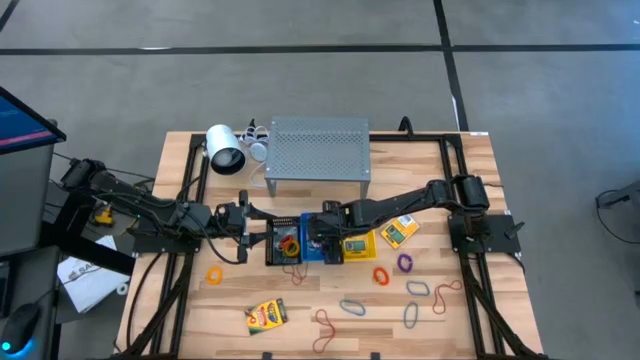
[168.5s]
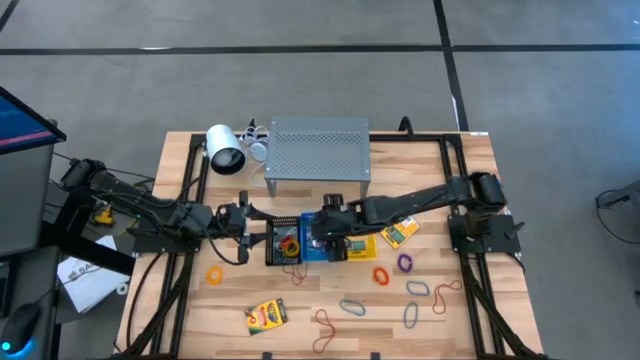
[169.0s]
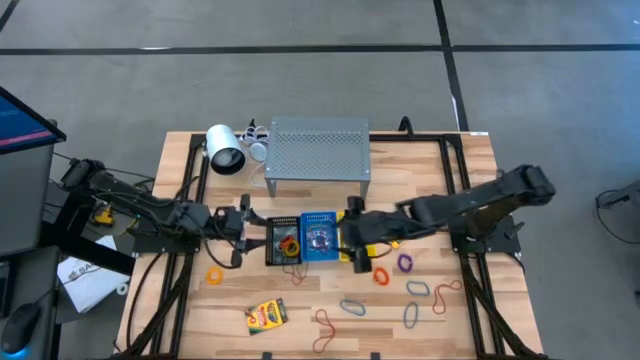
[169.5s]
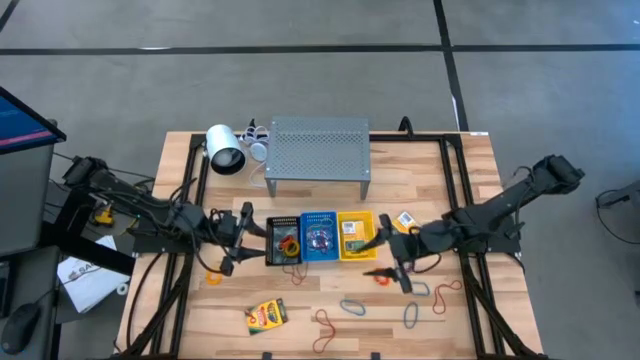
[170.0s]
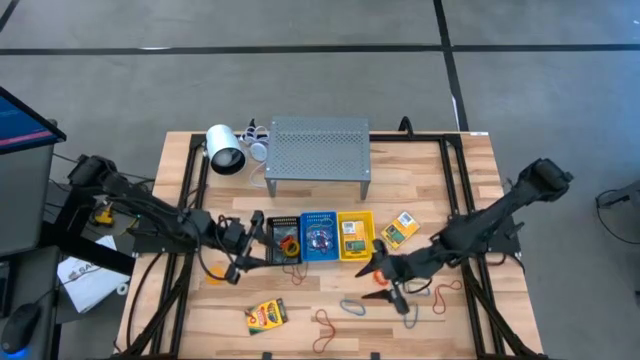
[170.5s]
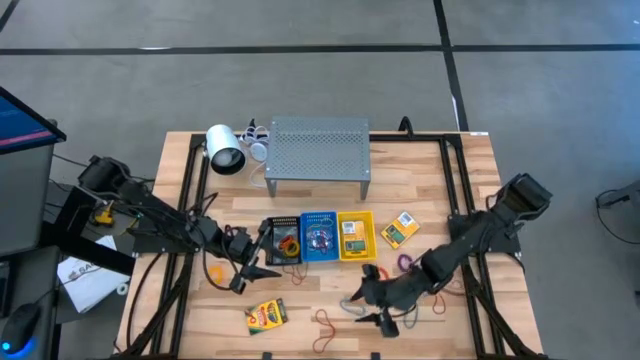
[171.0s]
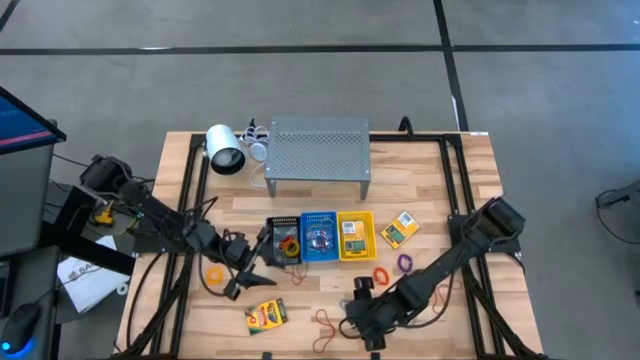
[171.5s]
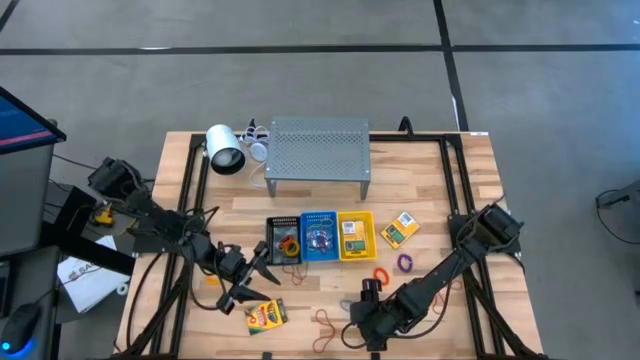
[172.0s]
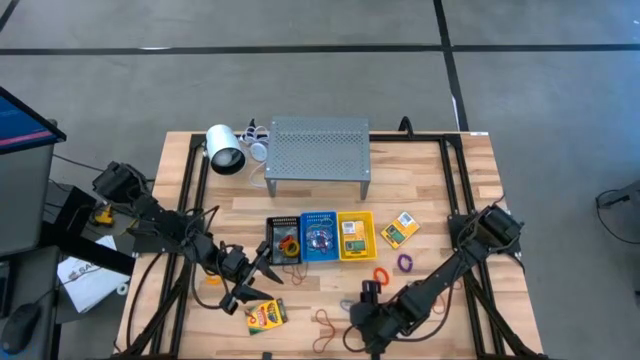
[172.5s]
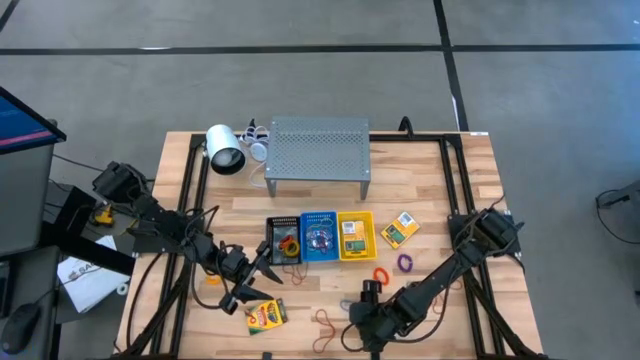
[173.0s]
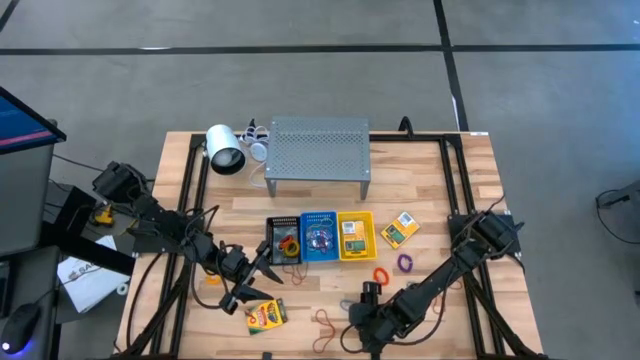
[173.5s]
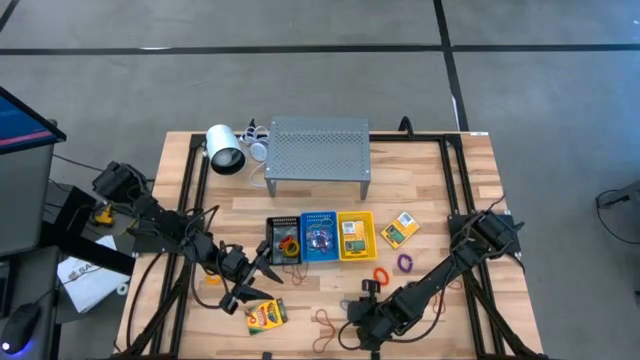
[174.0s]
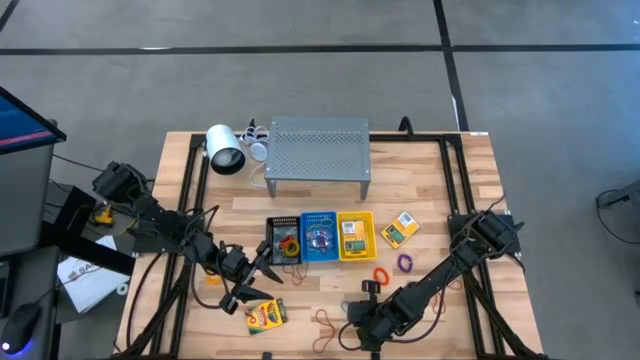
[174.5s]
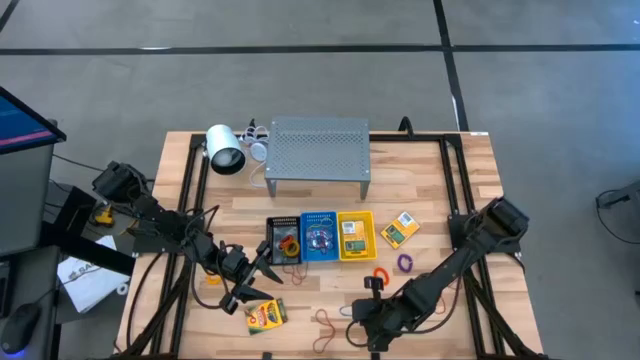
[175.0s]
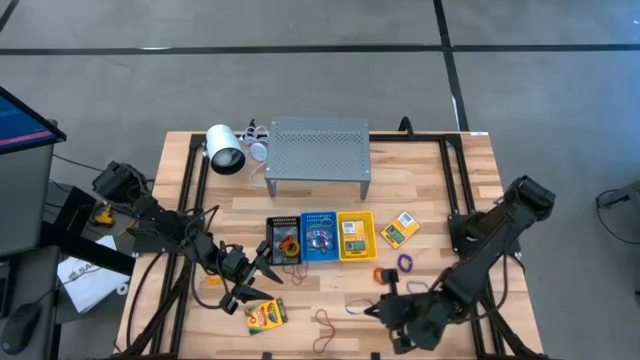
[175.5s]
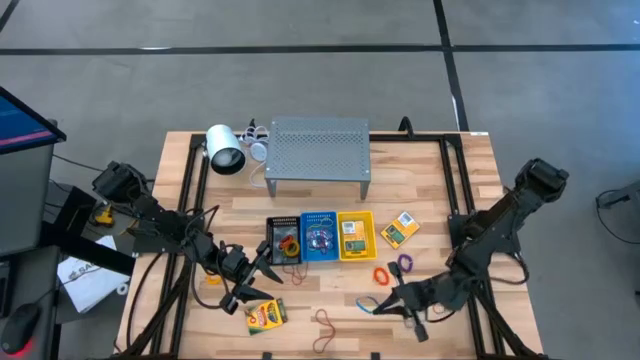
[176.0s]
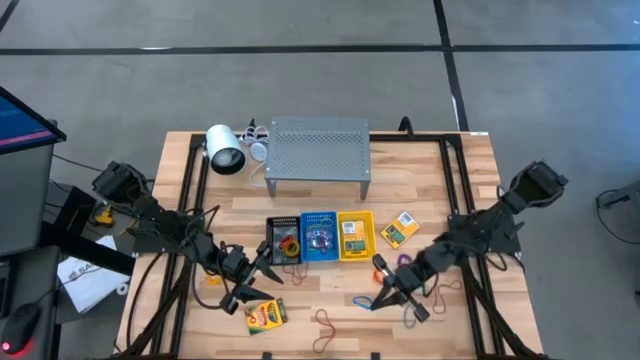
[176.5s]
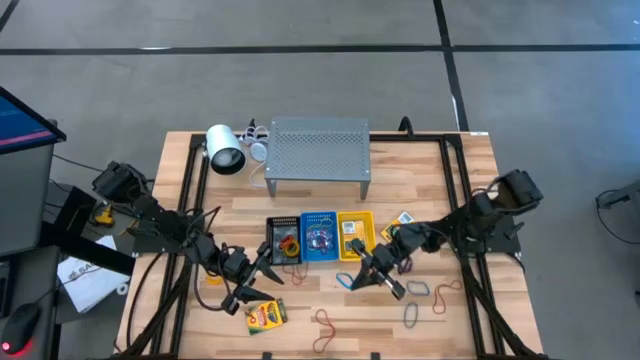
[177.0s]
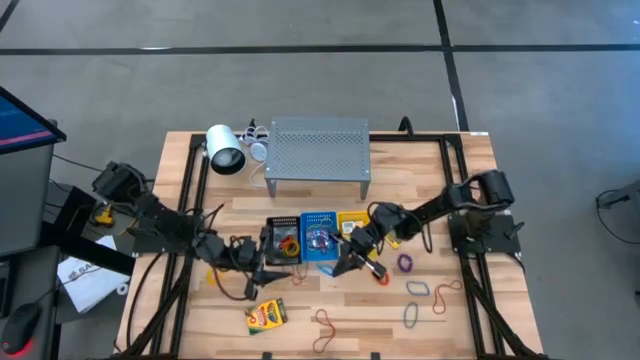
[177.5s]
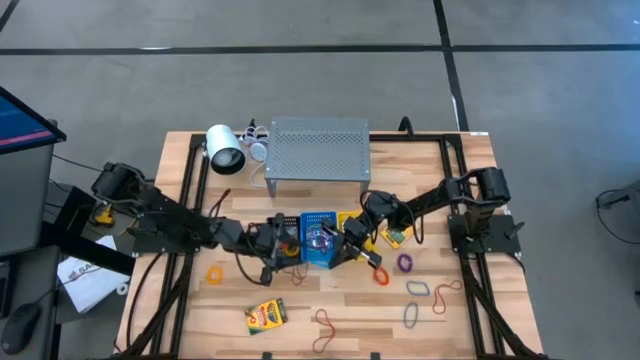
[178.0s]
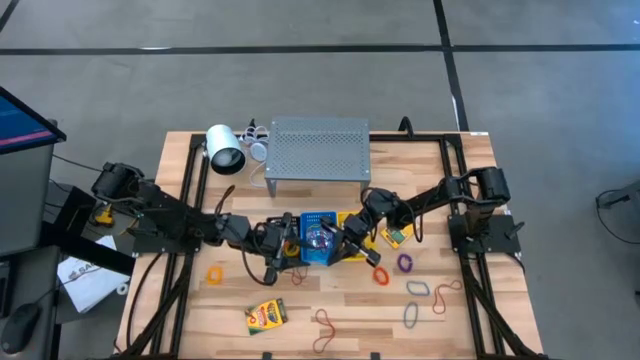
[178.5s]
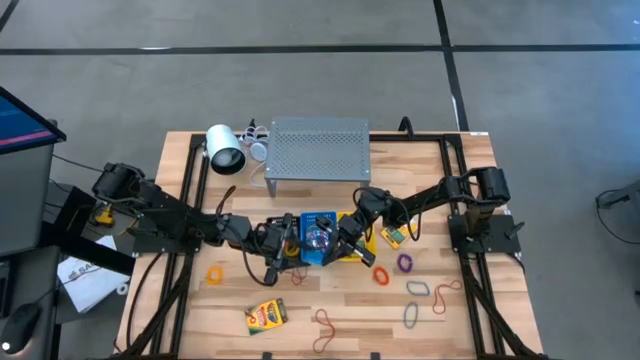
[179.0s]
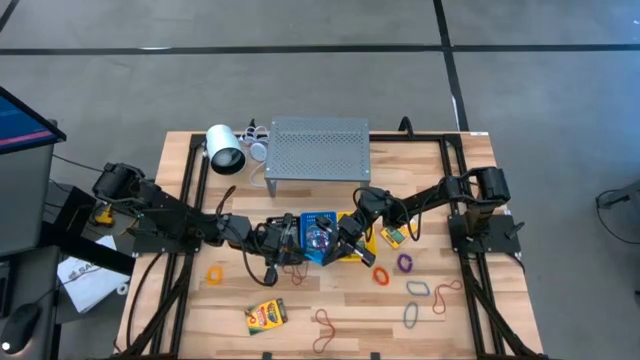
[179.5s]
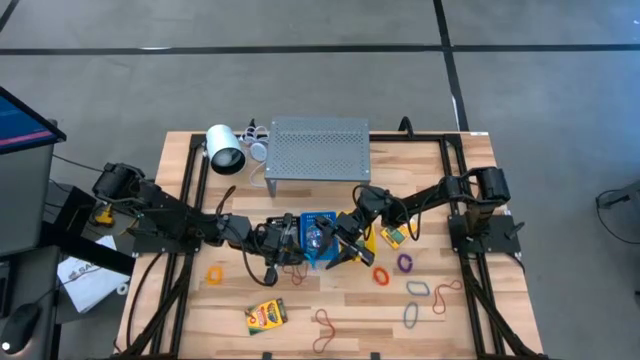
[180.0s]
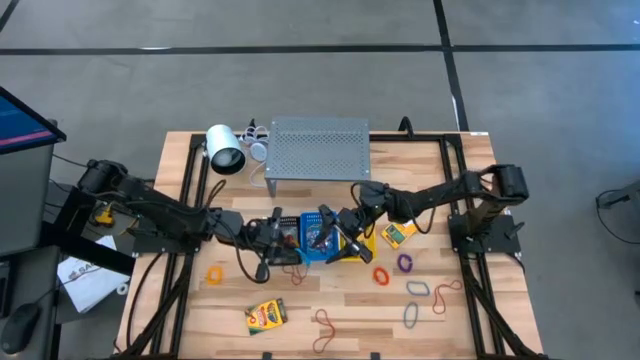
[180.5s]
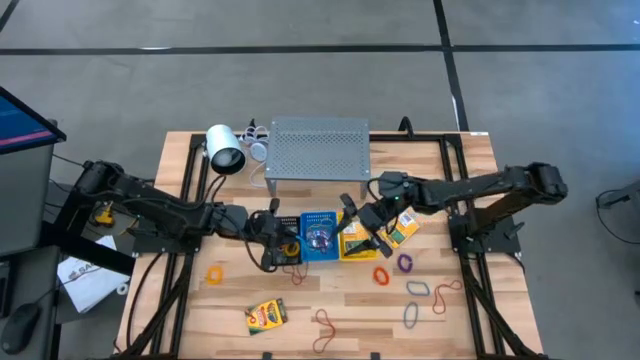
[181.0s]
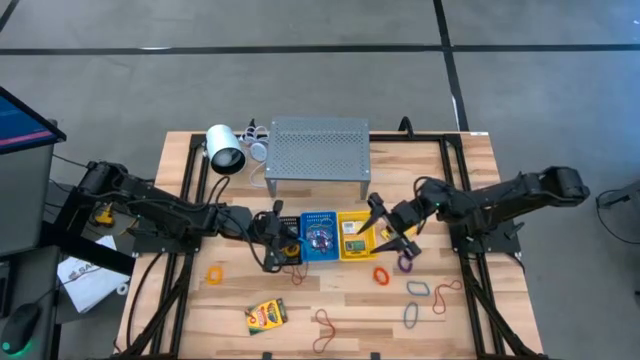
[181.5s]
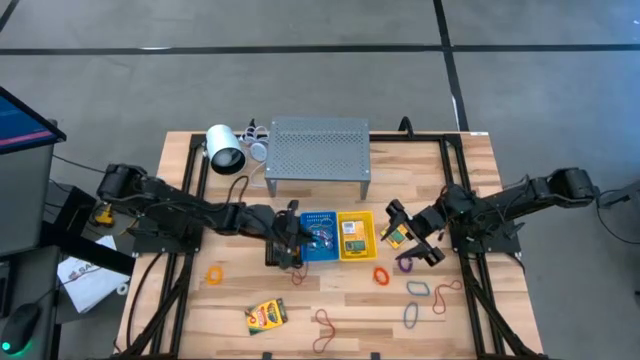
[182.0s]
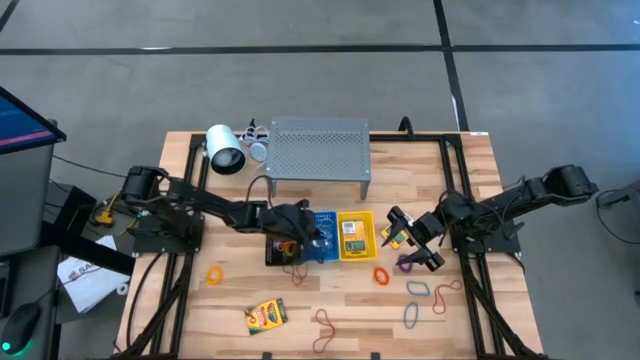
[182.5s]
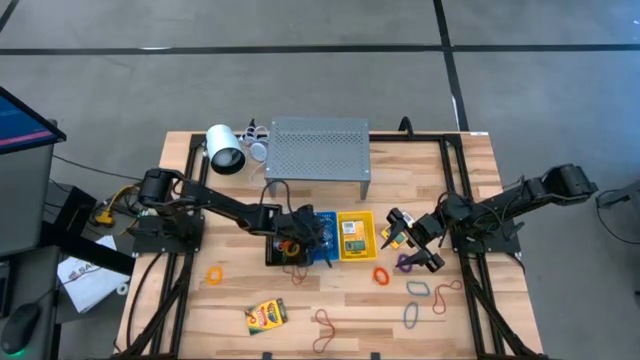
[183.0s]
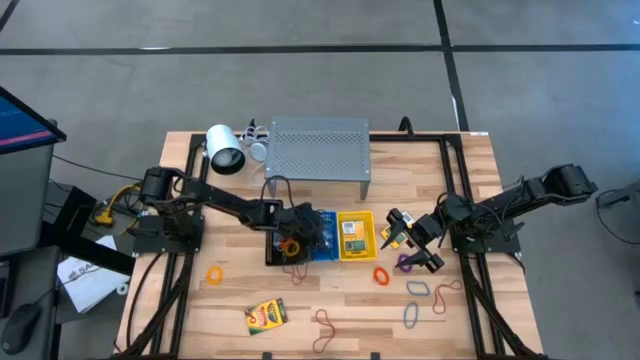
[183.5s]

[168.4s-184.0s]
Task: Pick & Place Office Desk Supplies
Put the blue rubber band into the blue basket

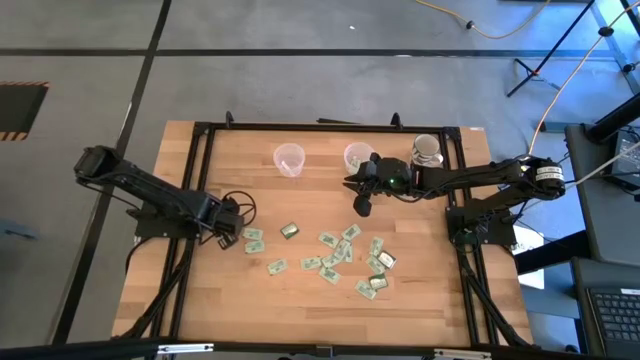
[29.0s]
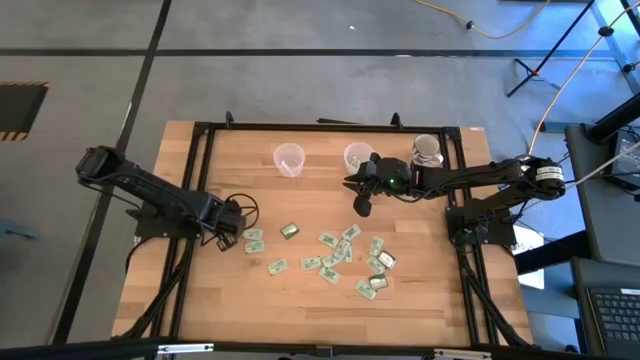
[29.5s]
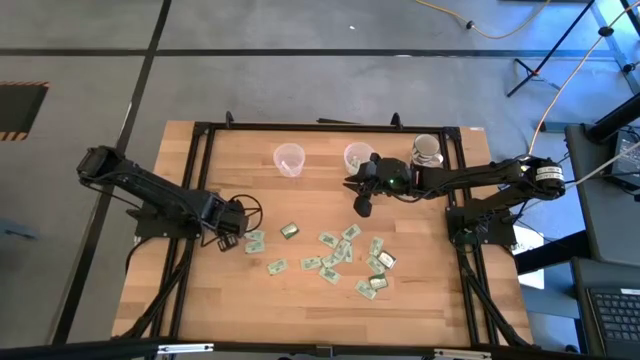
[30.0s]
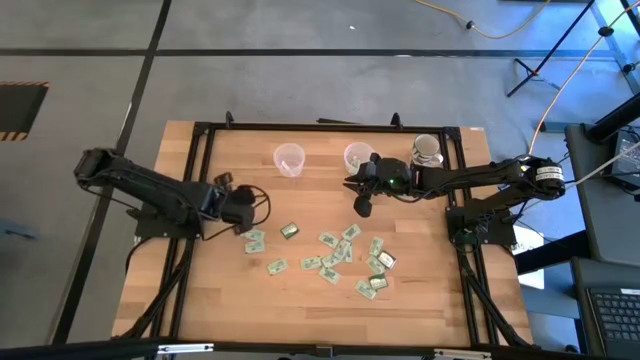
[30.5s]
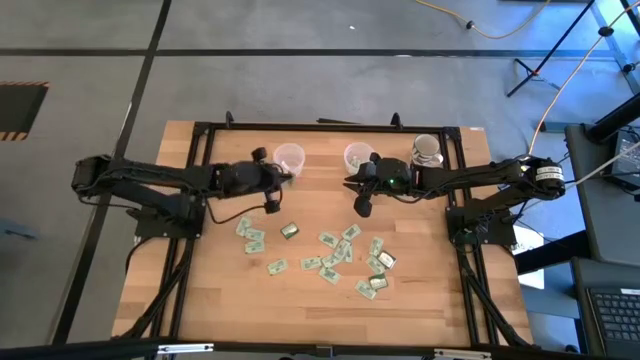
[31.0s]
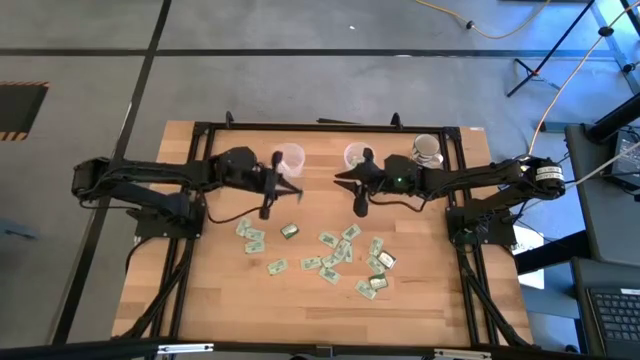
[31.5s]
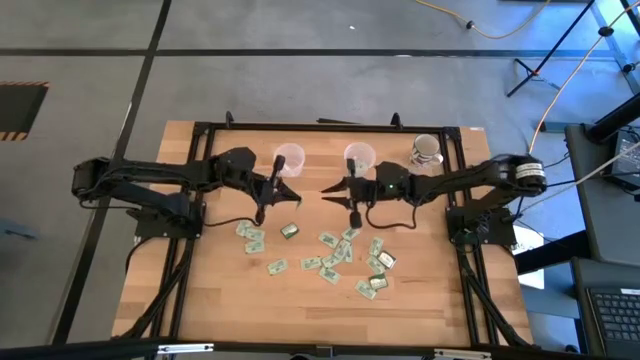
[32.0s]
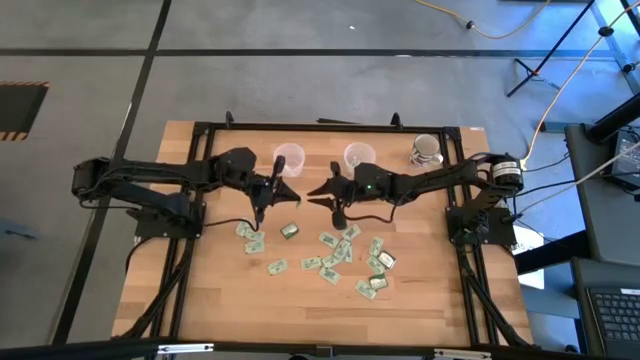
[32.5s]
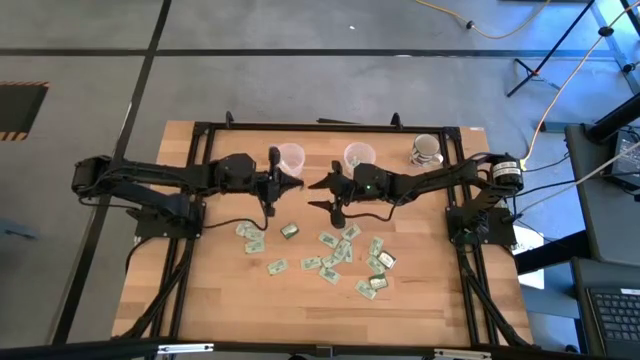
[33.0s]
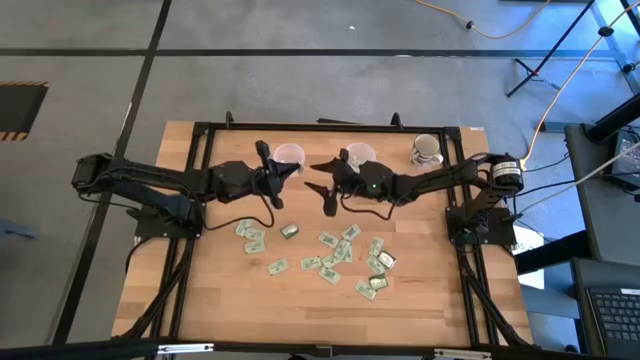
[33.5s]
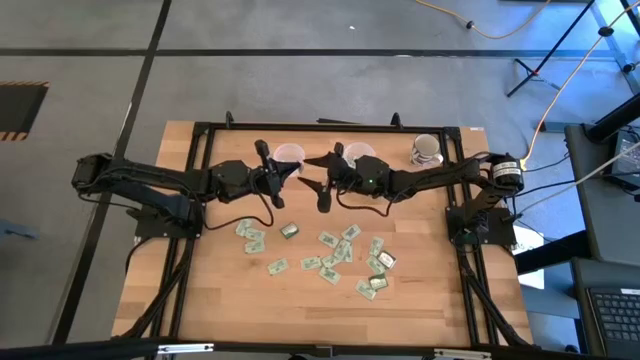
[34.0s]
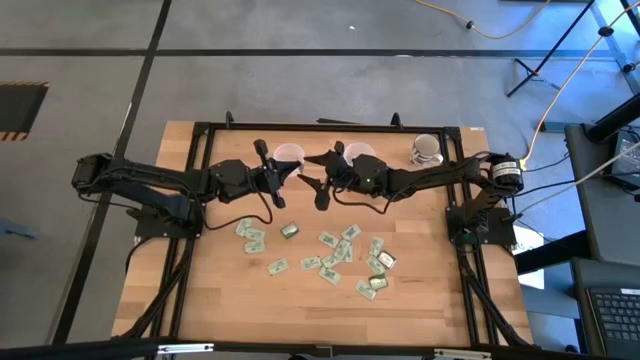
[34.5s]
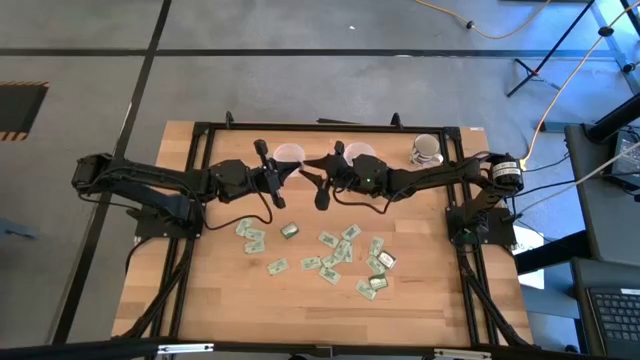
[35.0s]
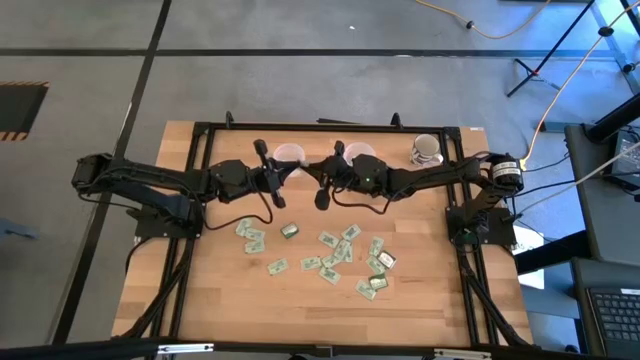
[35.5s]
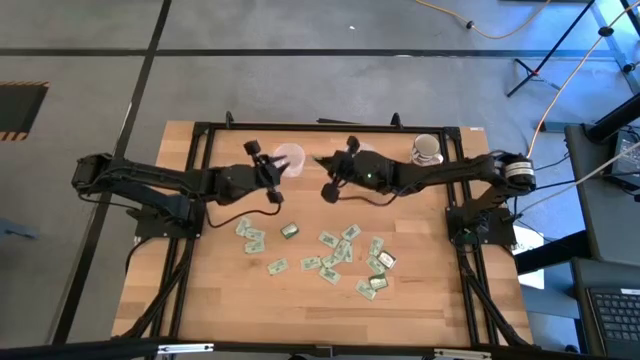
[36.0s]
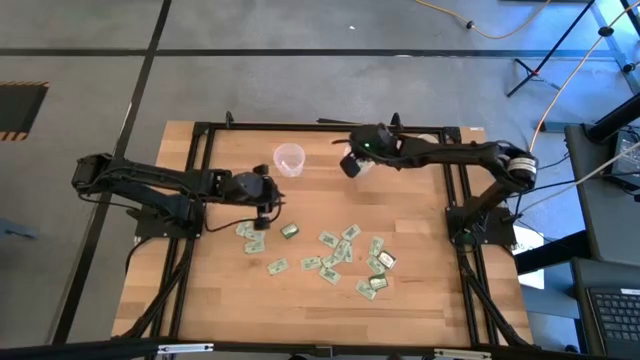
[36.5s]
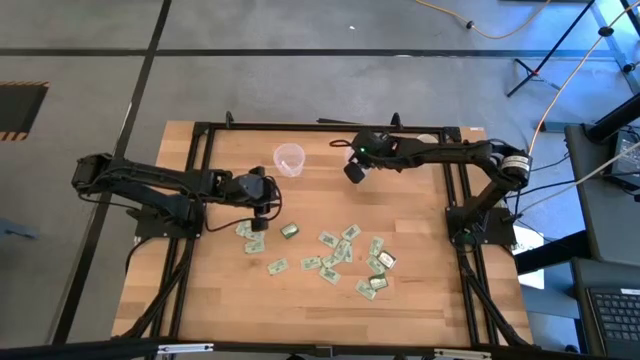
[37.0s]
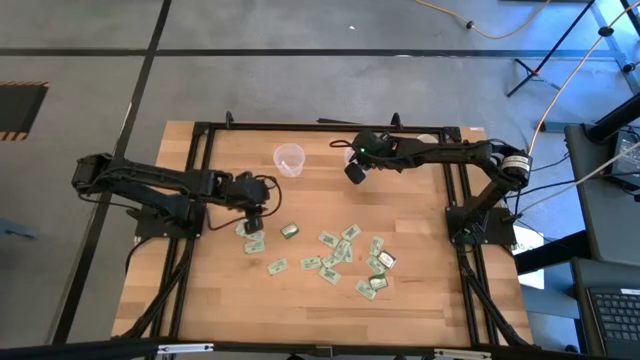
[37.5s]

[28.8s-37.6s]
Task: Pick and place Stevia / Truvia into bins
Put the stevia packet into the right transparent container
